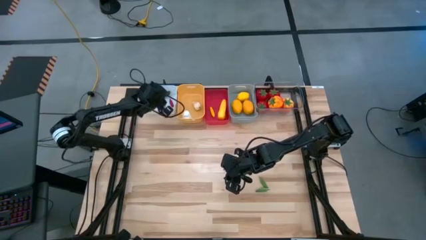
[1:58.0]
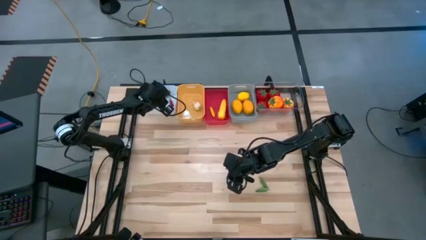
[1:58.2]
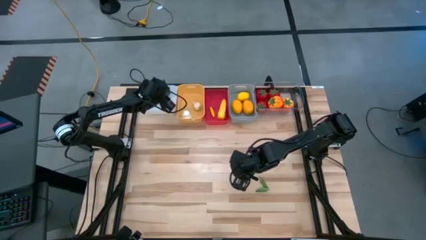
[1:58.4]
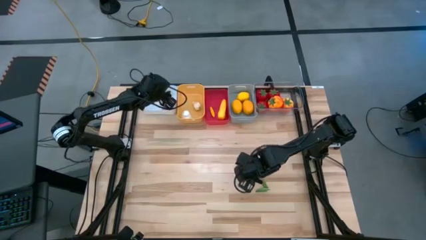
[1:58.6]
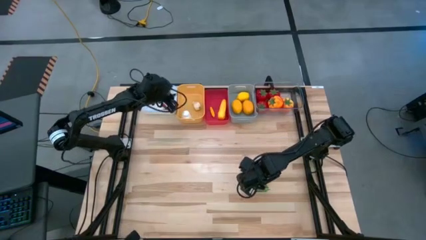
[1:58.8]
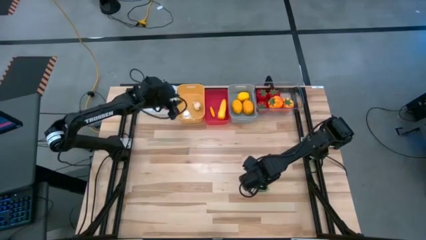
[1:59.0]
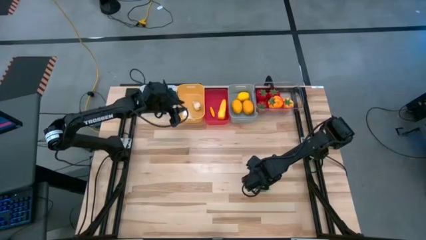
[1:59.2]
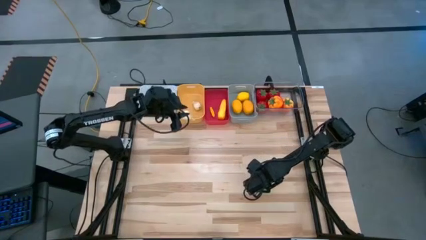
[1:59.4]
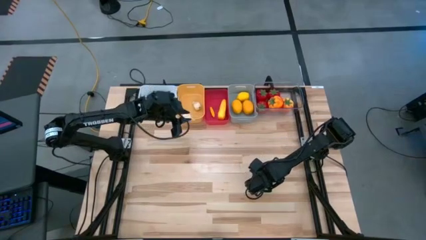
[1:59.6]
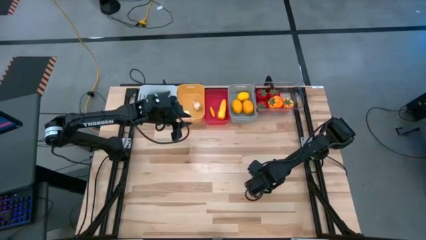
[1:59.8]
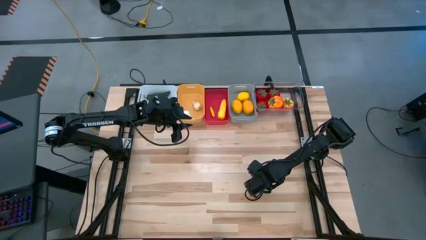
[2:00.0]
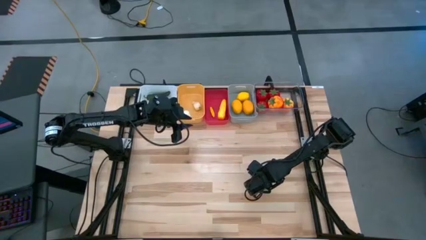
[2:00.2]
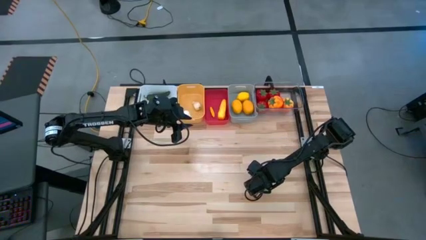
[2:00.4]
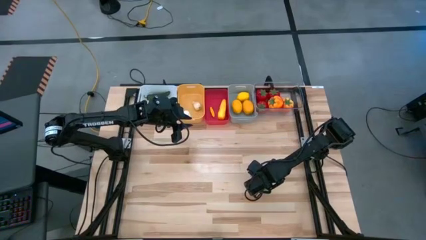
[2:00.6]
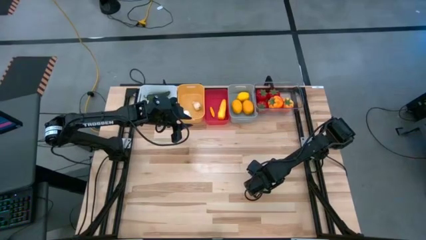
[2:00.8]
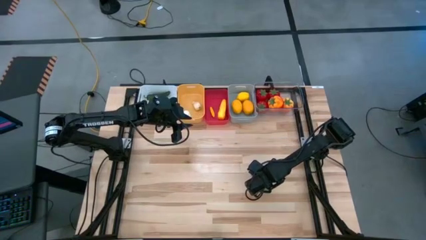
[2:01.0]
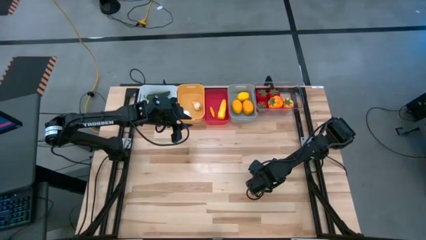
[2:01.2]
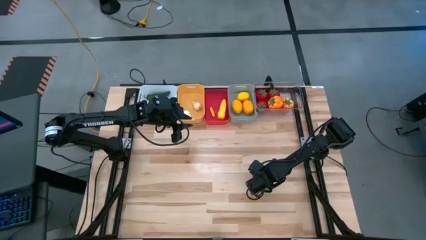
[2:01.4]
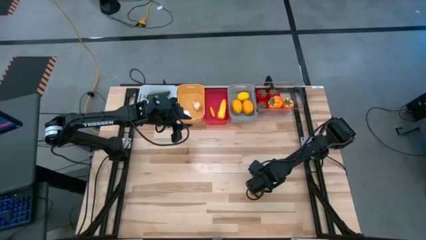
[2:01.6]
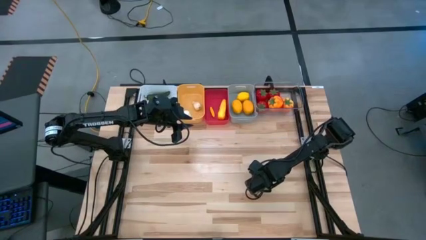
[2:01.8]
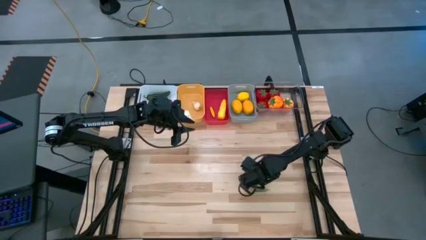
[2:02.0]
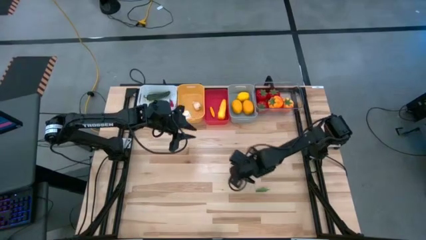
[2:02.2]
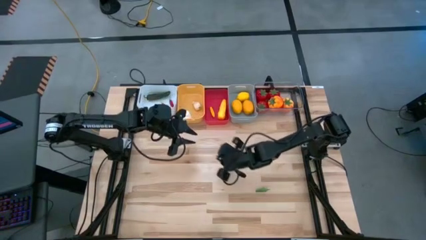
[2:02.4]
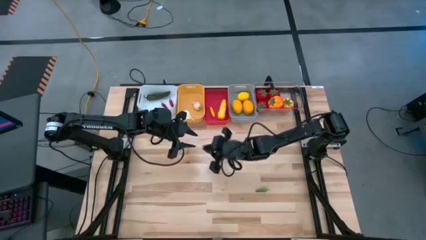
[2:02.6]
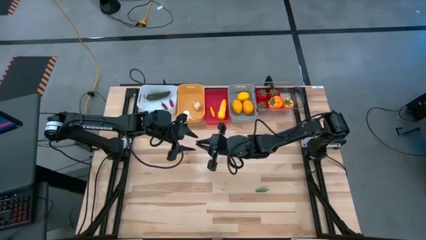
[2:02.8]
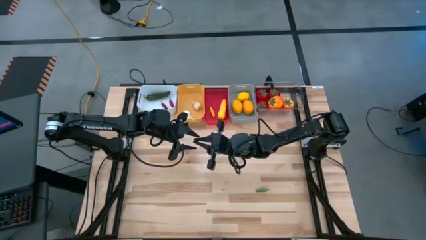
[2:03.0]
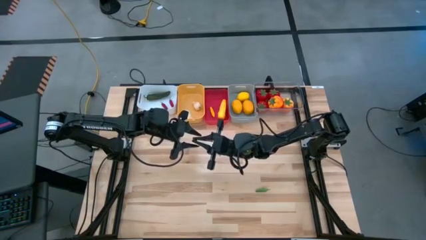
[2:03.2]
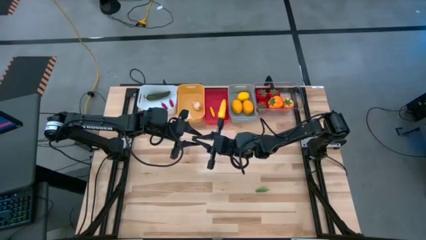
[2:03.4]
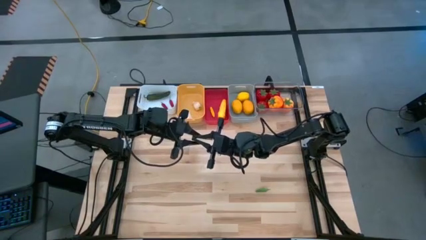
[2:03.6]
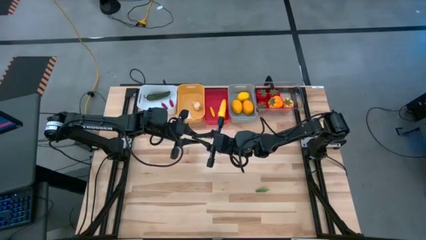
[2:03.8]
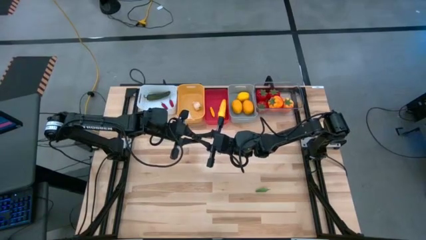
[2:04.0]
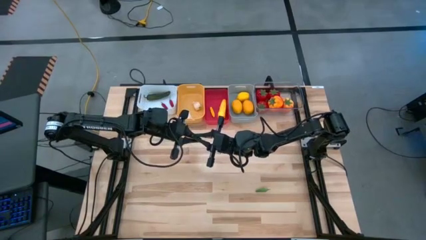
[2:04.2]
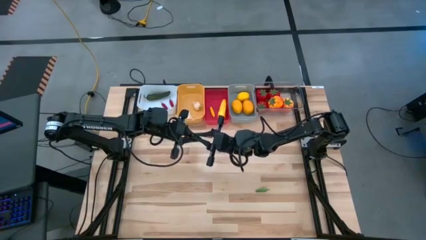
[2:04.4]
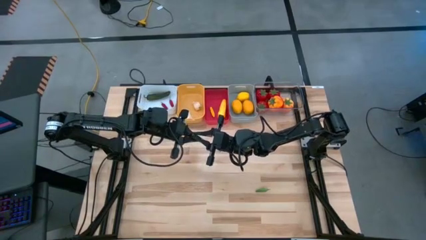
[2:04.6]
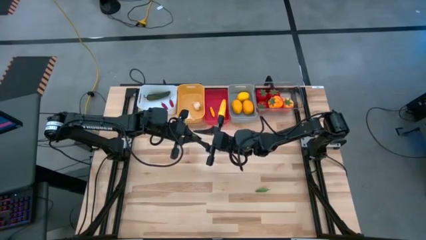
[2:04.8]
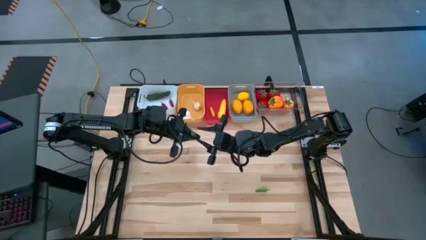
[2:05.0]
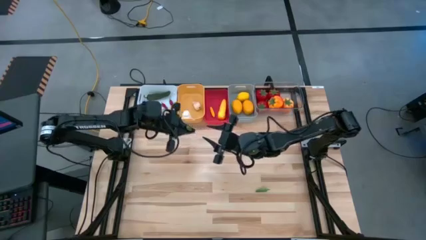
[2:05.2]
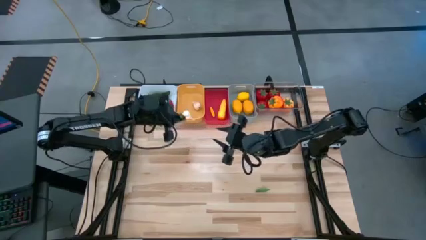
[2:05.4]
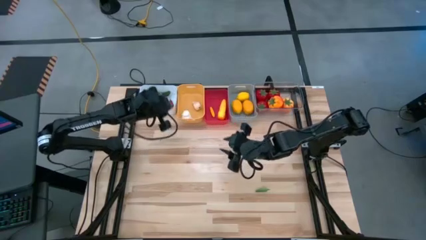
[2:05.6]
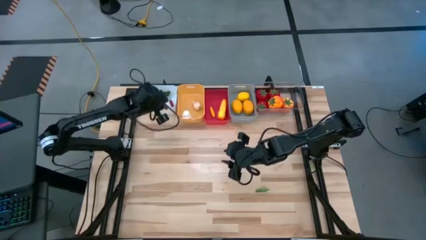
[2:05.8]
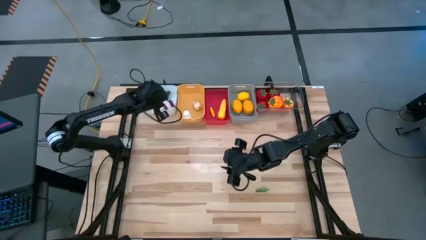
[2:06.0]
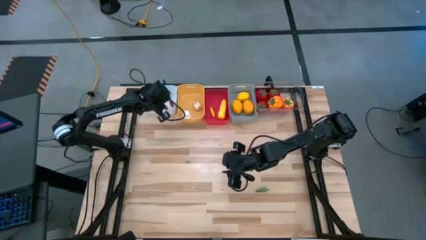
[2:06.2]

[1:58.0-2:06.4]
Task: Sort produce into baskets
Put the green chili pepper into the white bin

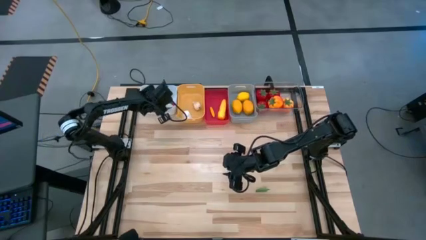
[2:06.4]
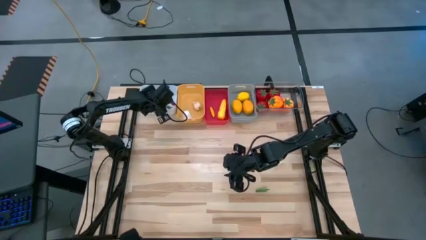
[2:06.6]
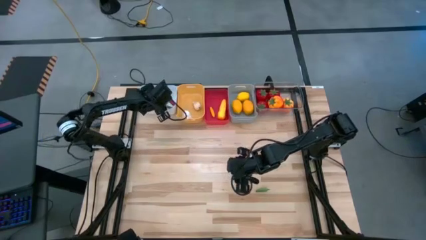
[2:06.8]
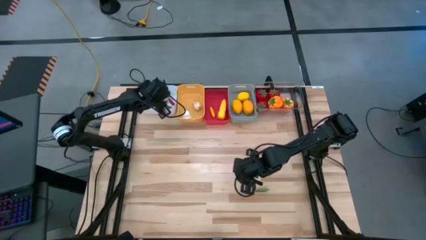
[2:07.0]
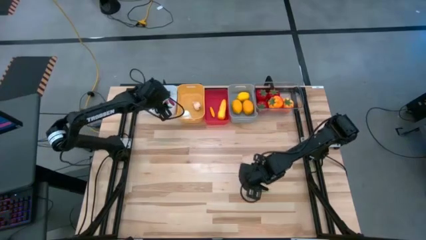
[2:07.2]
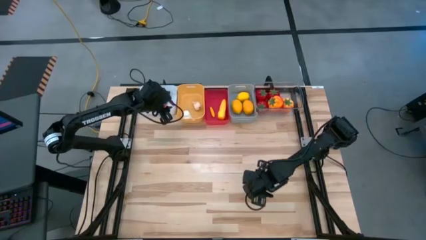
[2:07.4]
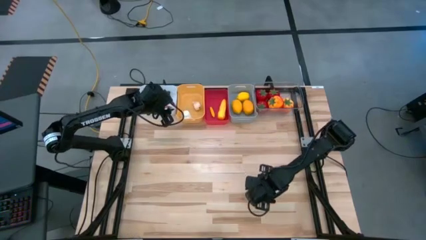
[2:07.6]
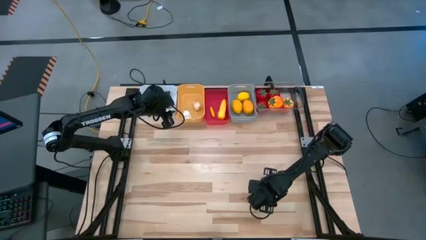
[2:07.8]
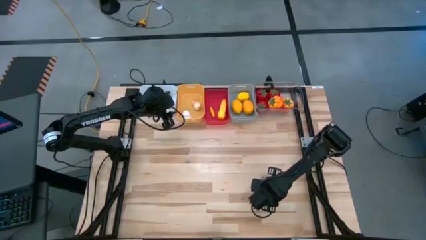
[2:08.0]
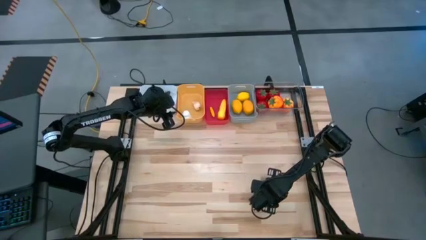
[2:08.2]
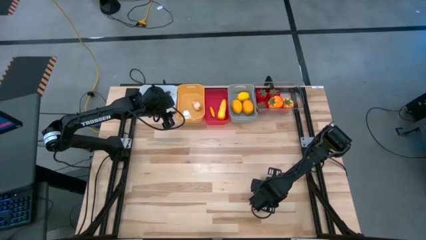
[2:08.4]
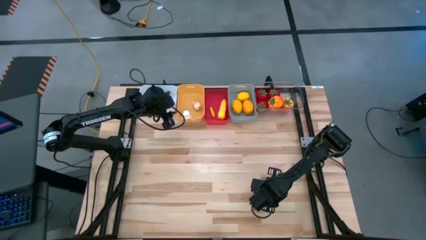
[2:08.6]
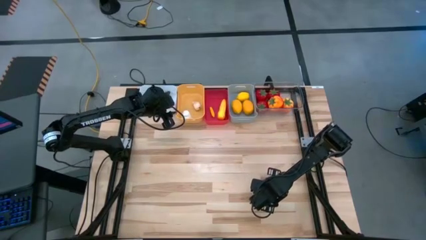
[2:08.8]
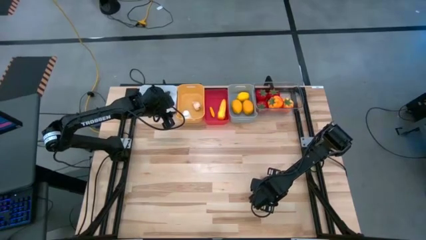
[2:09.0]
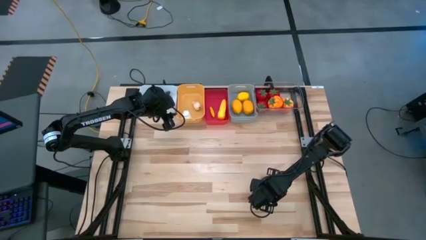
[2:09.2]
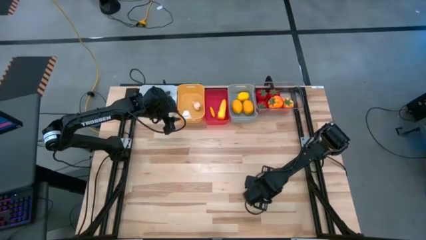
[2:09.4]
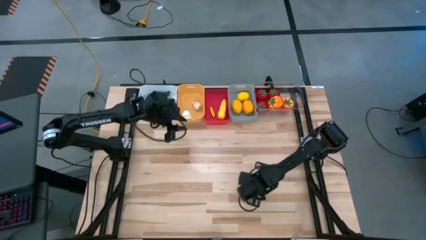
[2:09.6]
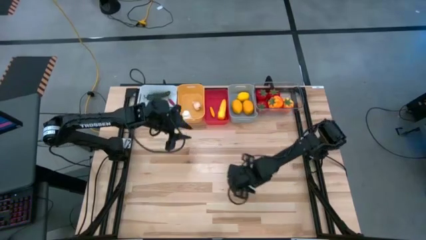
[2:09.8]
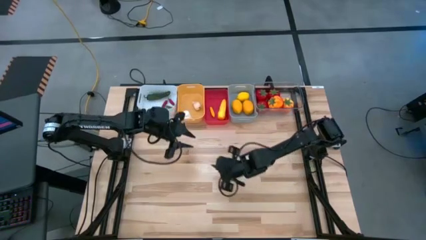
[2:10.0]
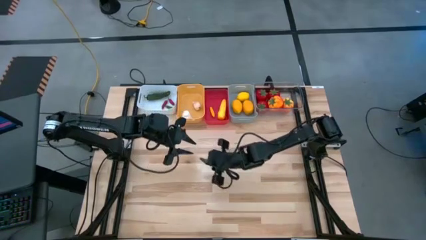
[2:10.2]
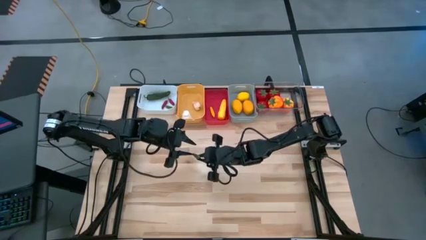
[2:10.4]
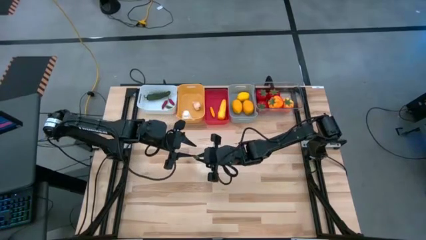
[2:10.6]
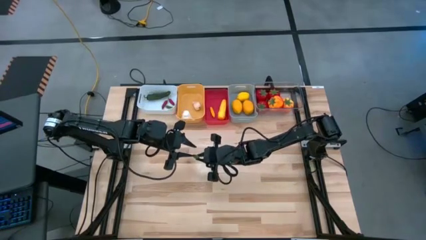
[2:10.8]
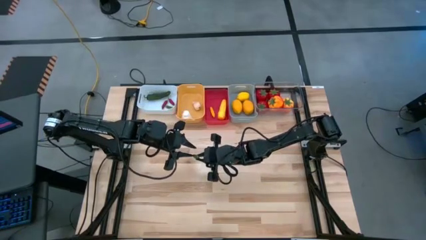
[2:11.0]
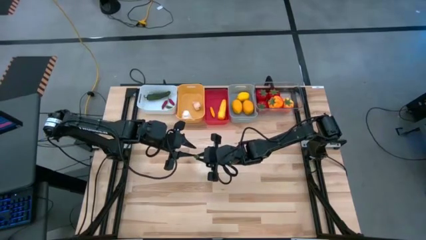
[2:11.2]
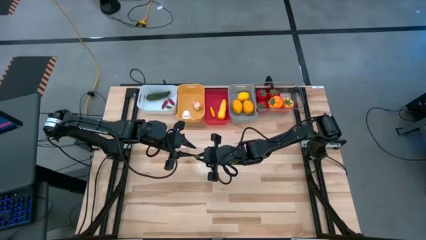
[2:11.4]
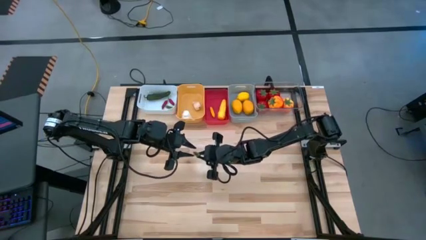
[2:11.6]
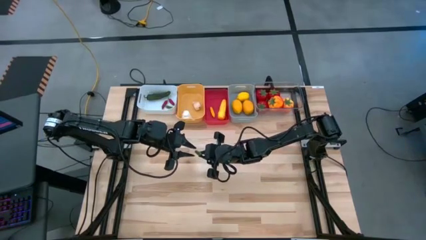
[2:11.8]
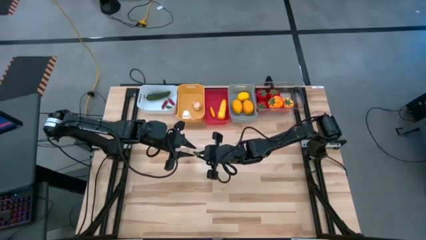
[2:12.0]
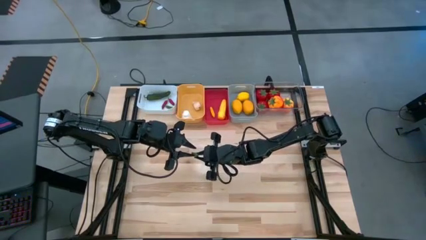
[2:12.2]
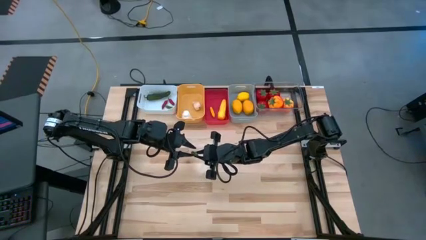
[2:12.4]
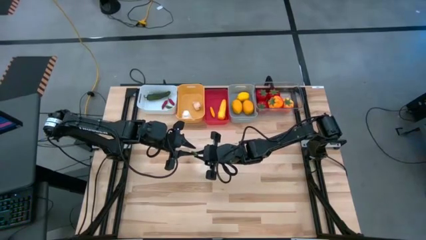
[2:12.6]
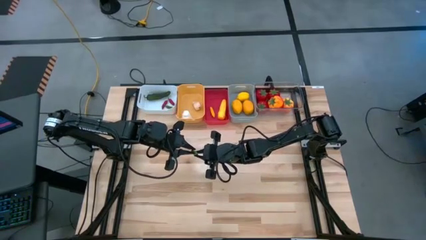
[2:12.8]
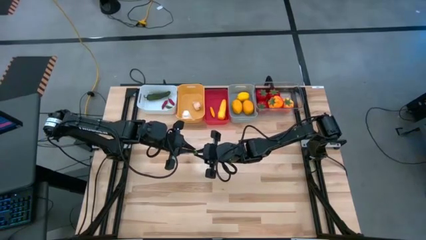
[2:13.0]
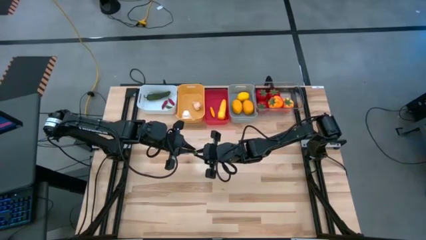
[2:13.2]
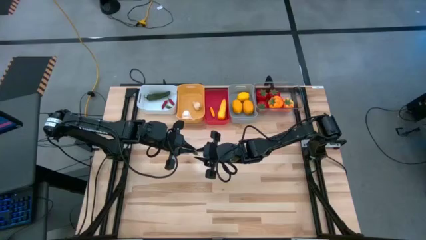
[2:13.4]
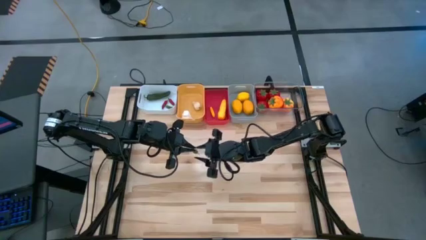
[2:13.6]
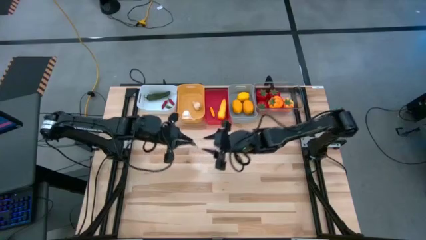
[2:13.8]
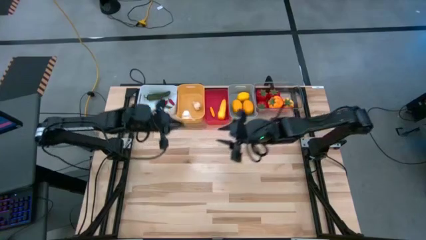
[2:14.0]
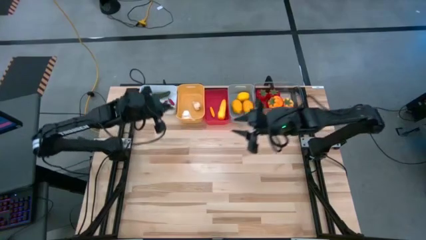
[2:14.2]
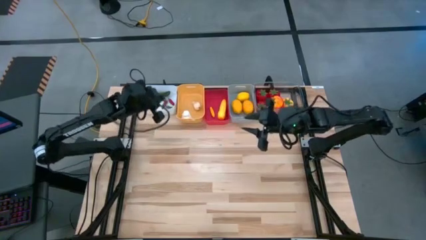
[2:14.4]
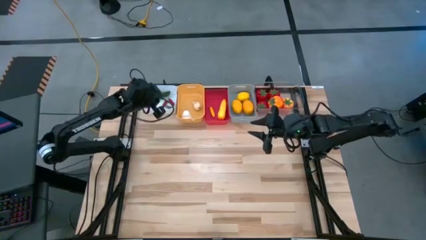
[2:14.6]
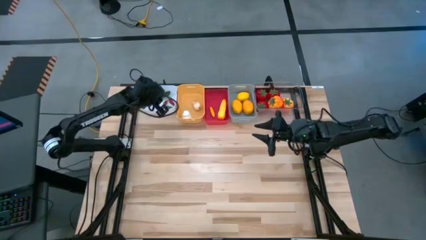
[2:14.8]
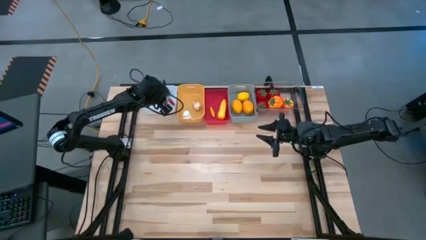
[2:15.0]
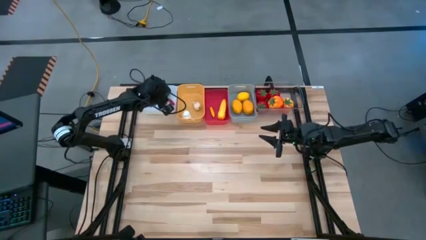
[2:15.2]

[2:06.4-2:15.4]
Put the green chili pepper into the white bin
